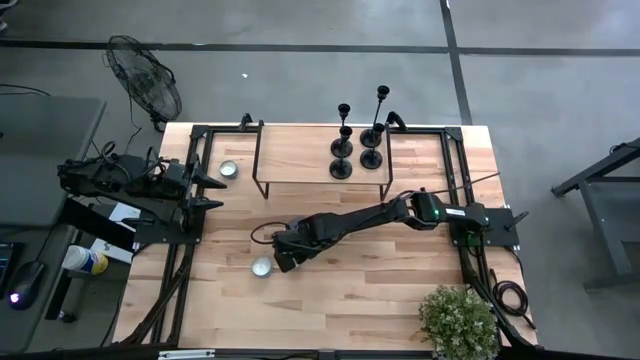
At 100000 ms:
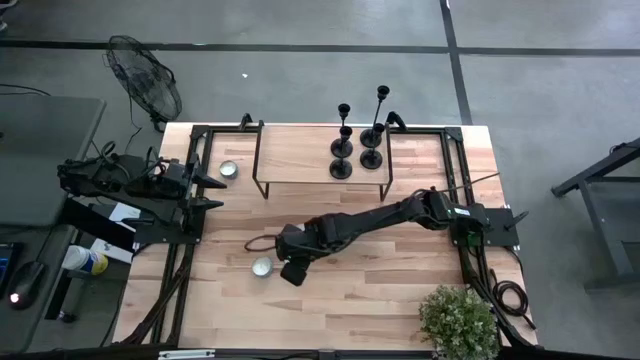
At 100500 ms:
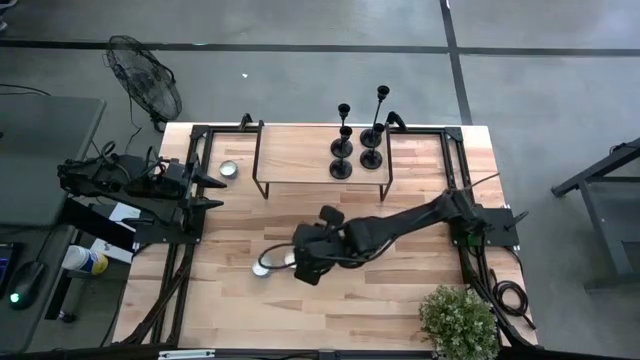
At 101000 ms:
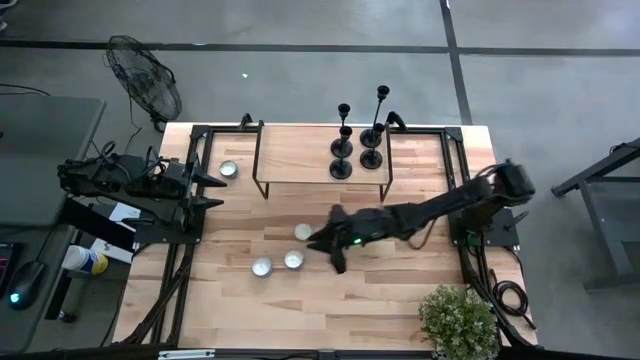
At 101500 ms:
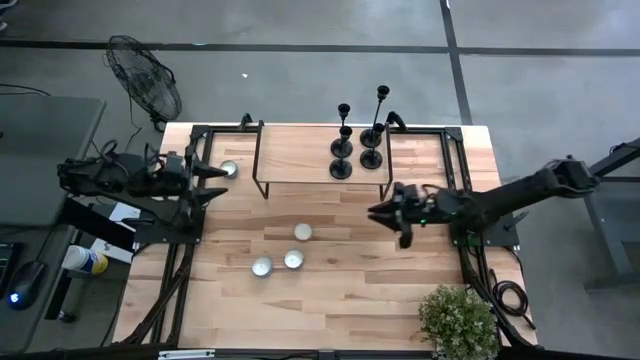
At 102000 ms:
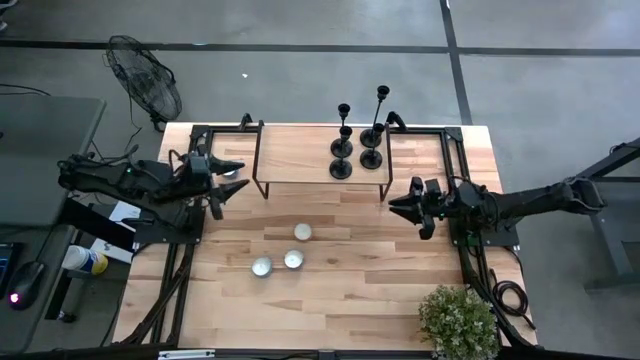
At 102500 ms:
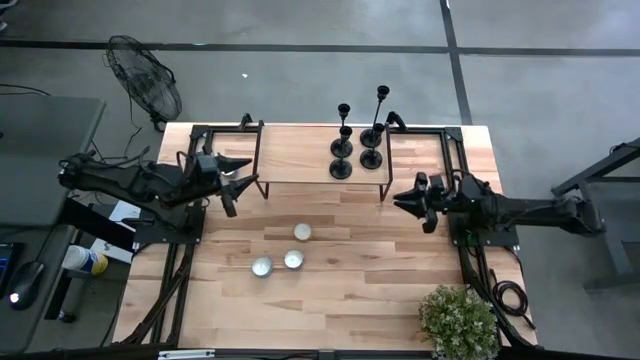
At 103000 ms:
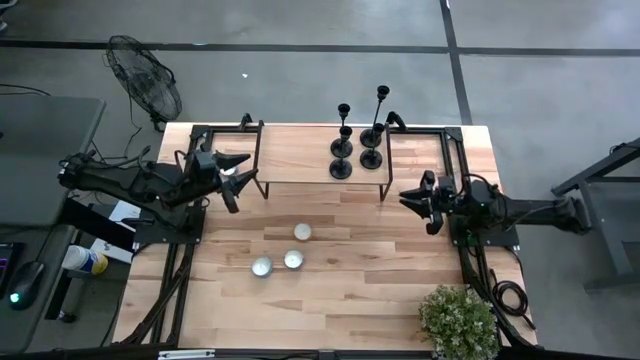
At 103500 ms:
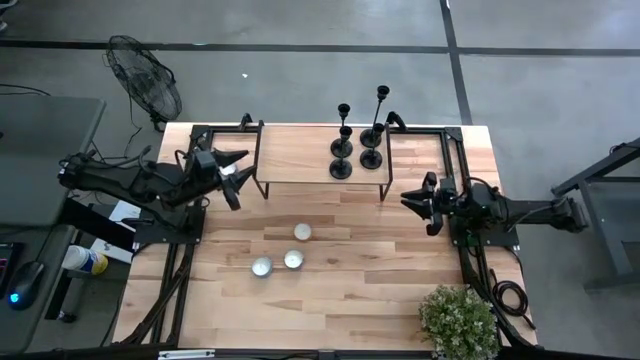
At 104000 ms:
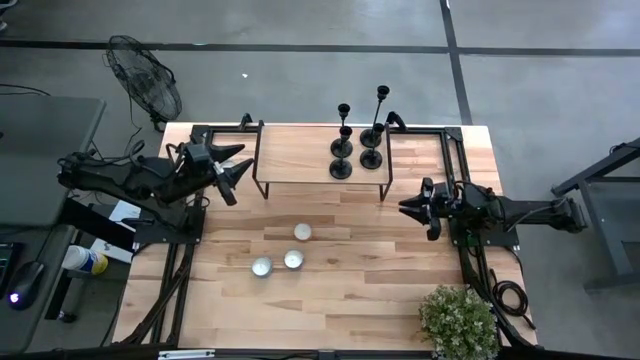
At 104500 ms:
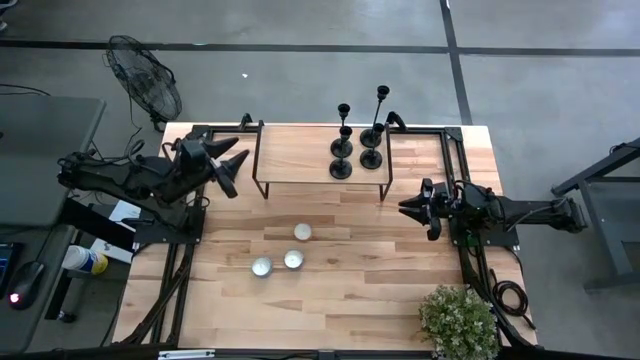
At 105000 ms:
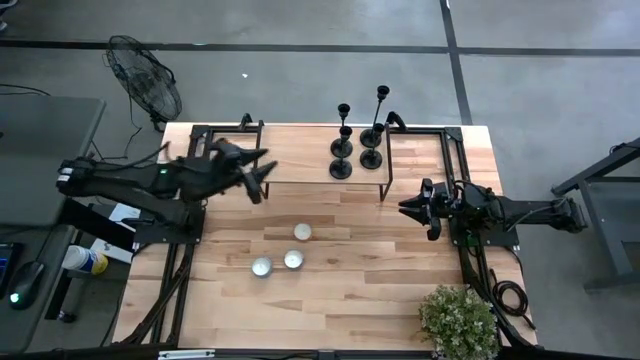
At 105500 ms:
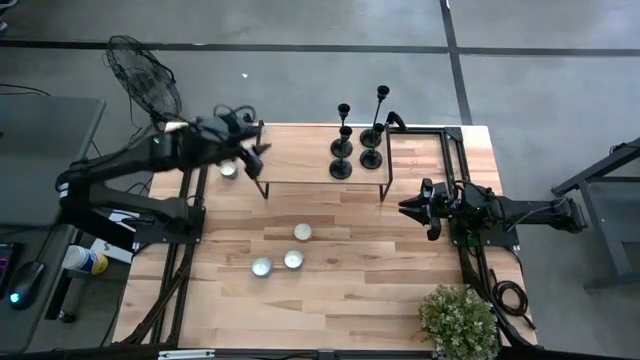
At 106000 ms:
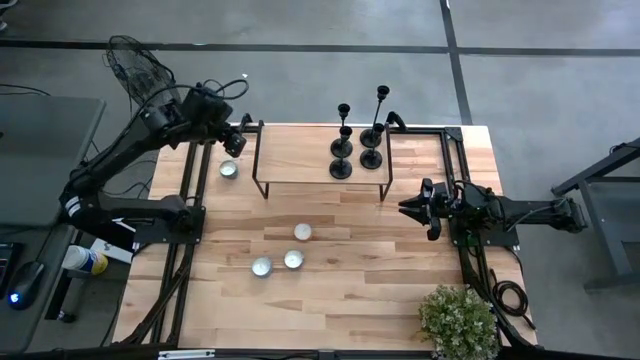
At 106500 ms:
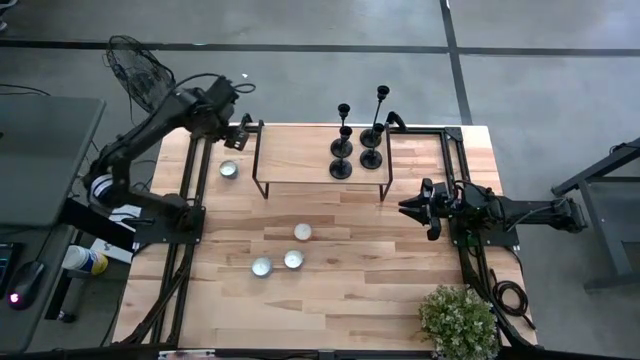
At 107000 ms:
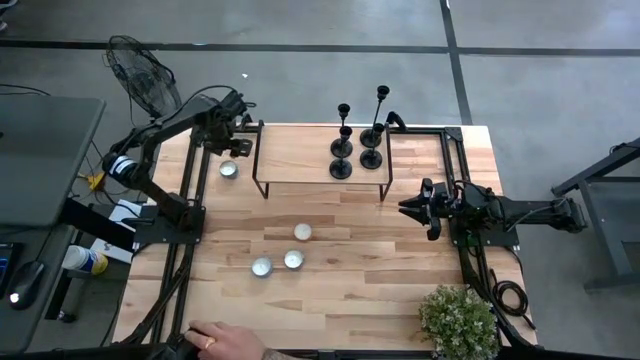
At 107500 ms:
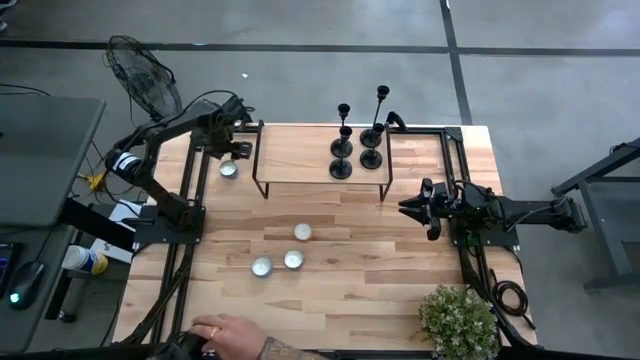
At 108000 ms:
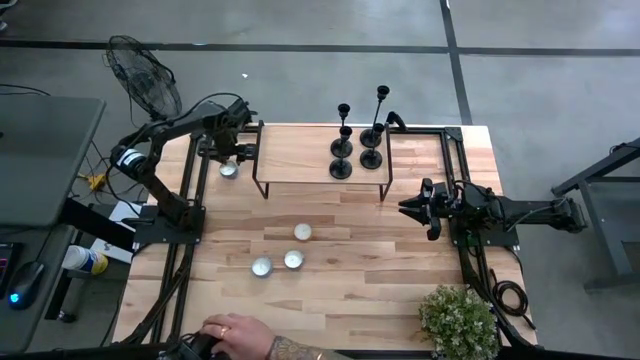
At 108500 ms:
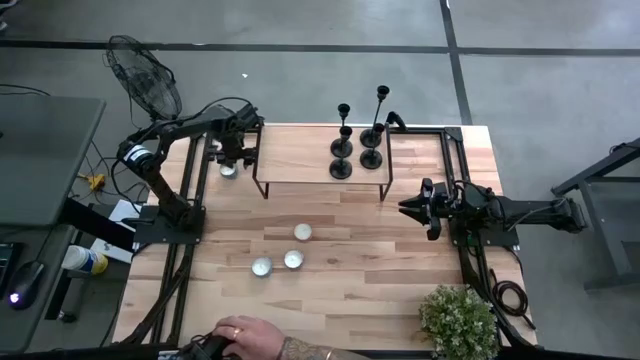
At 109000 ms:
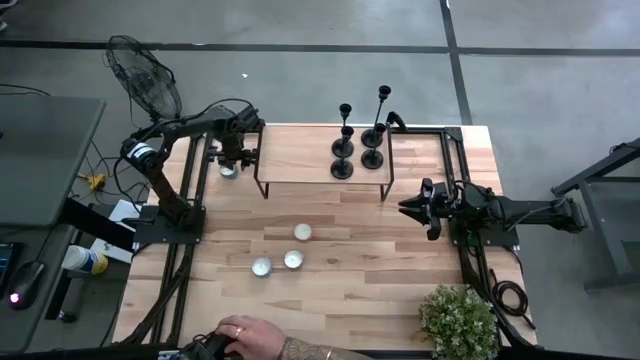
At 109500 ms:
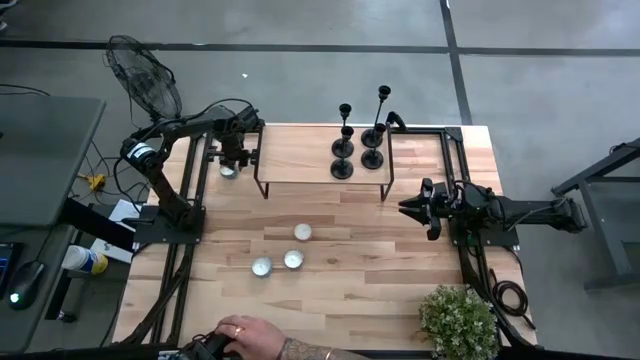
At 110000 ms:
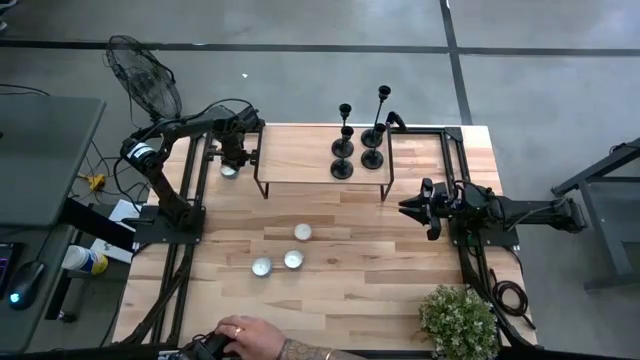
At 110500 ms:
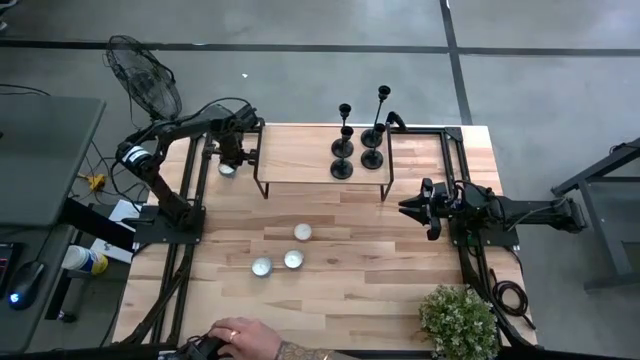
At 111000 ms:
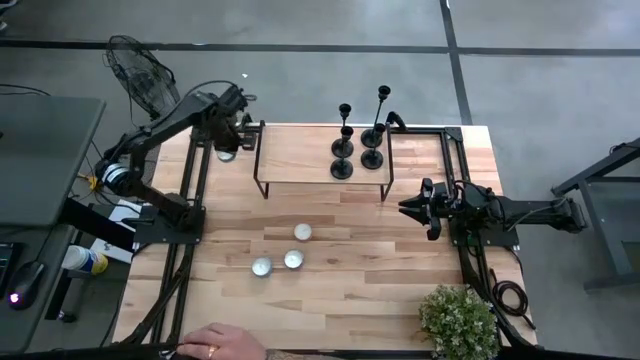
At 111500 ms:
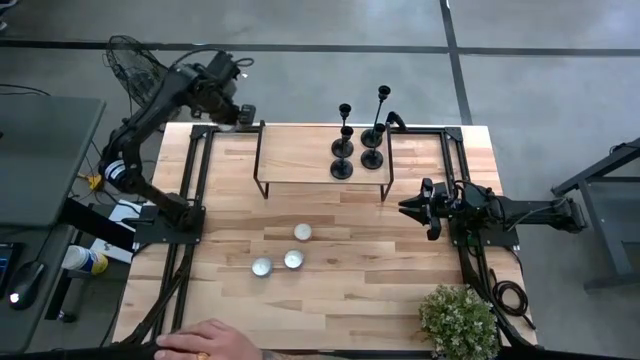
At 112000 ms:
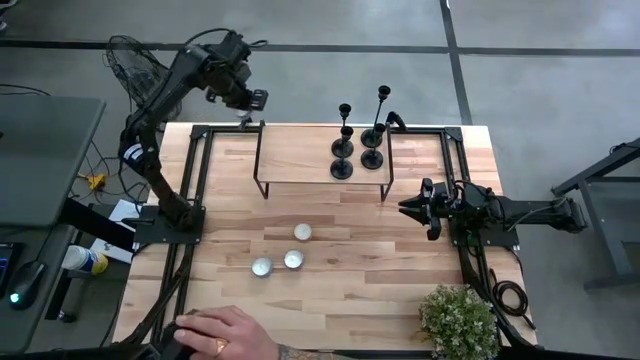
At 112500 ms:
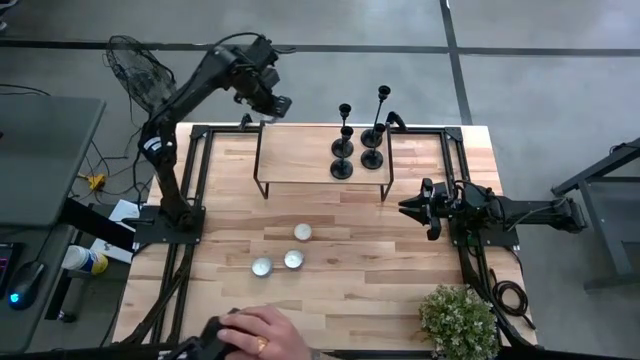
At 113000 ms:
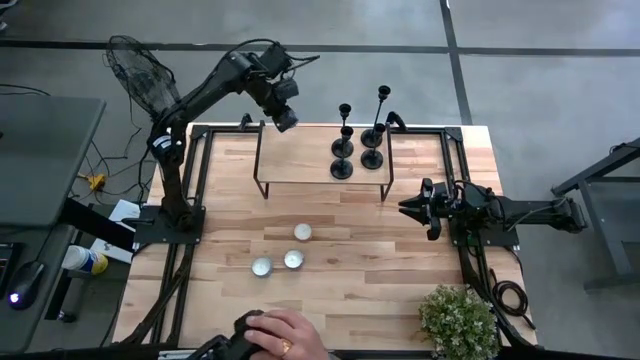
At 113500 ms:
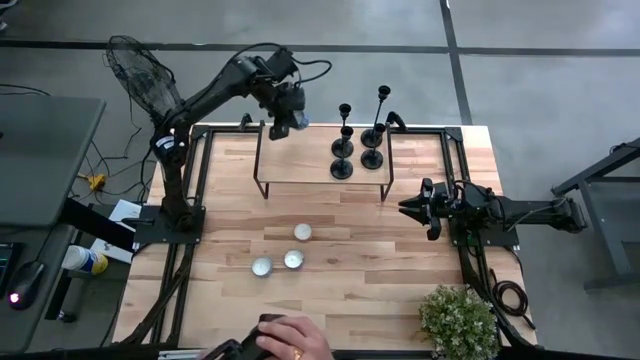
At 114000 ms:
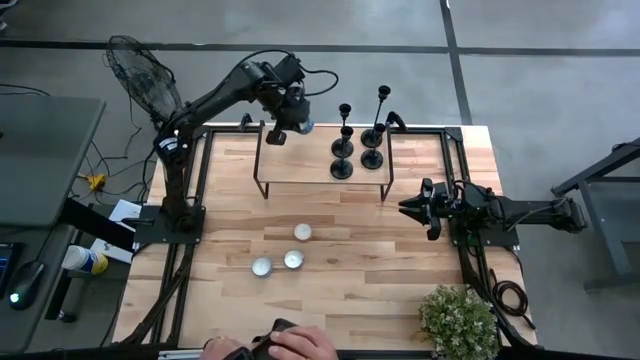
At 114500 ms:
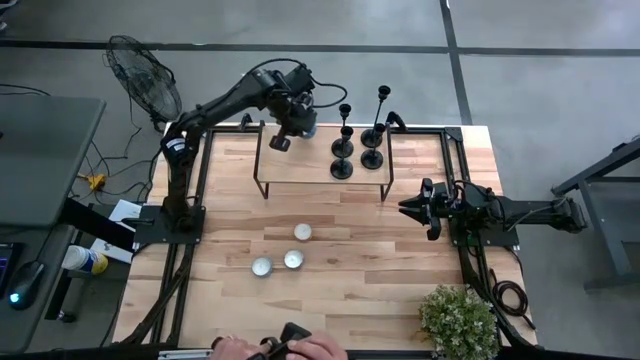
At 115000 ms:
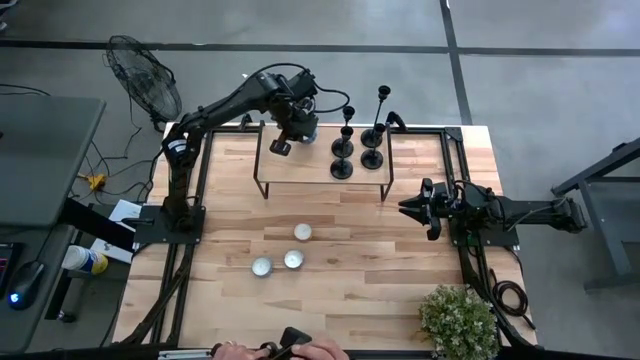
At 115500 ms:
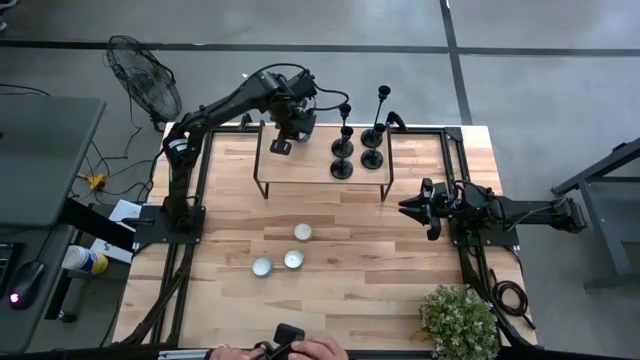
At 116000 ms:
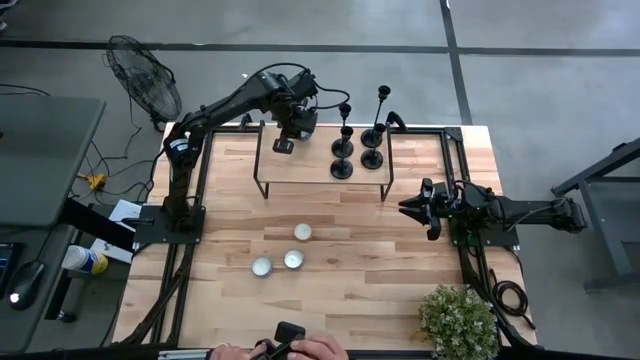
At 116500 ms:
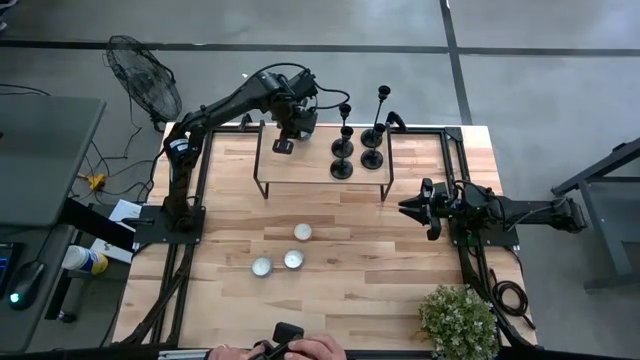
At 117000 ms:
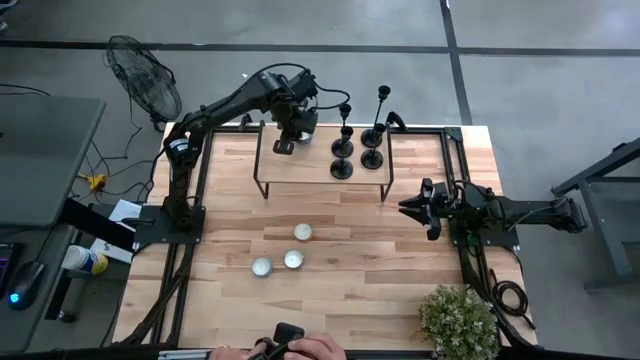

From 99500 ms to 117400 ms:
Task: Pick & Place candle stick holders
Put the blue scented candle on the shelf

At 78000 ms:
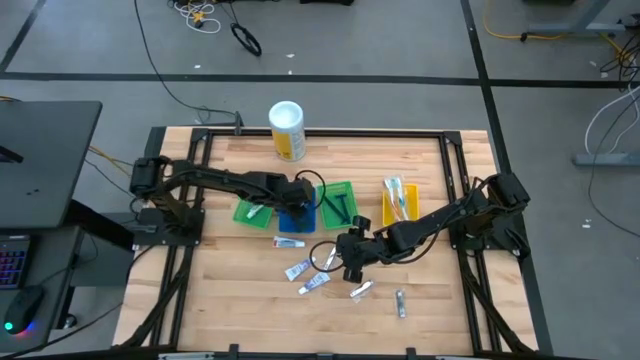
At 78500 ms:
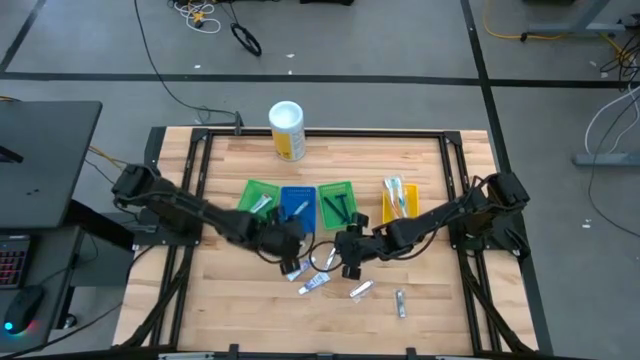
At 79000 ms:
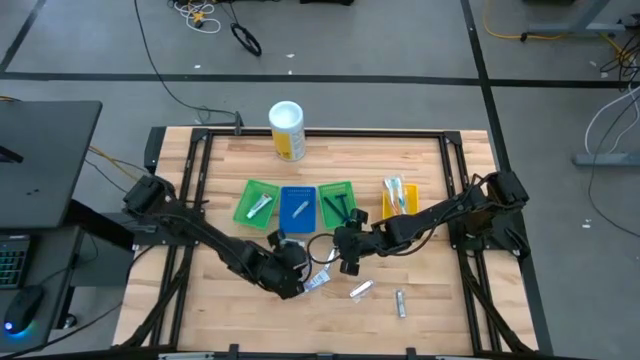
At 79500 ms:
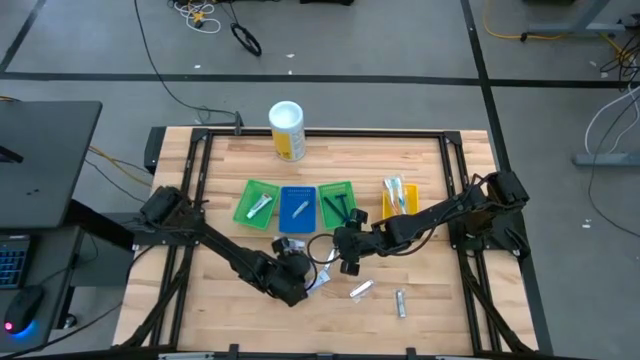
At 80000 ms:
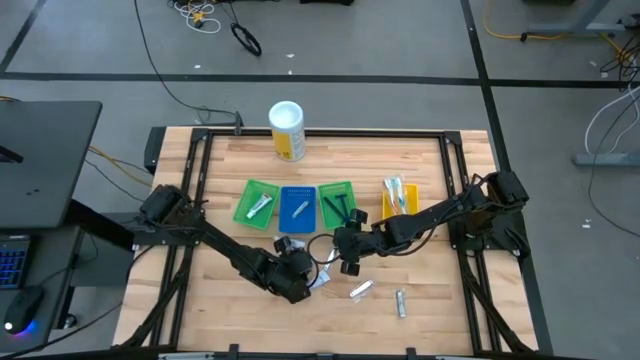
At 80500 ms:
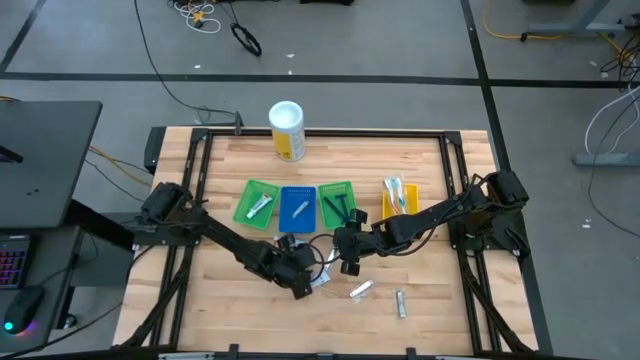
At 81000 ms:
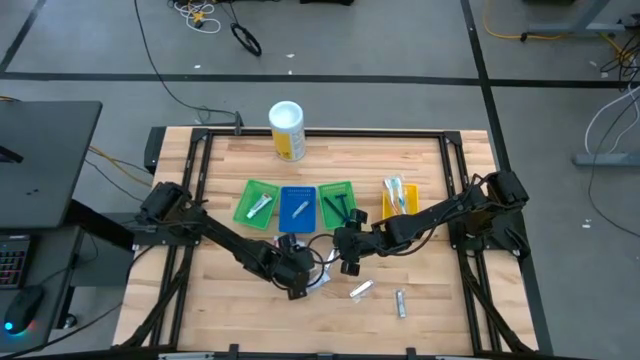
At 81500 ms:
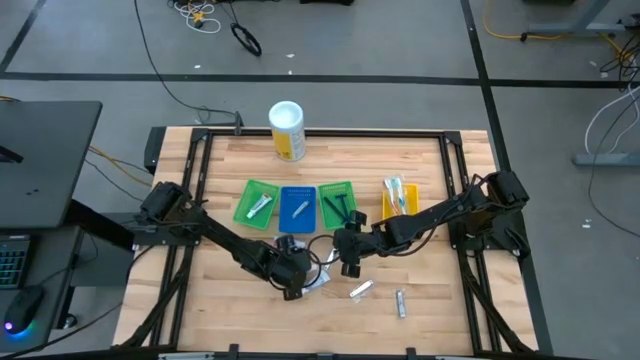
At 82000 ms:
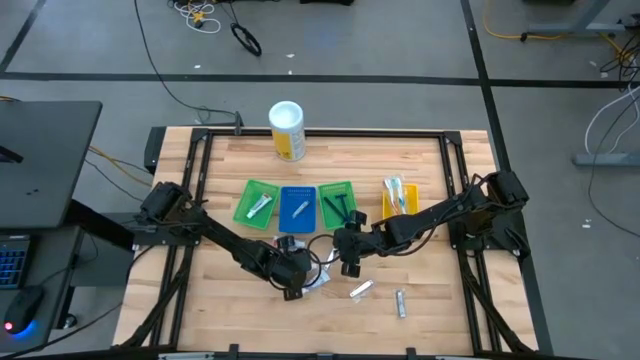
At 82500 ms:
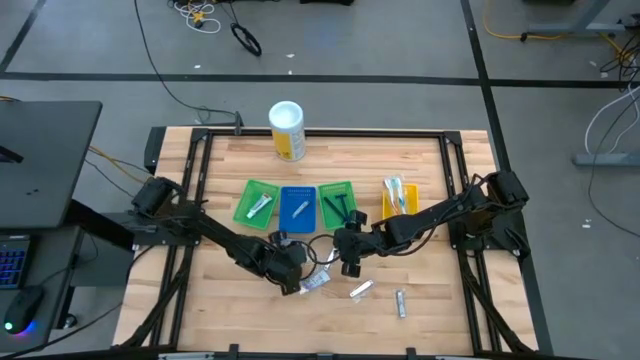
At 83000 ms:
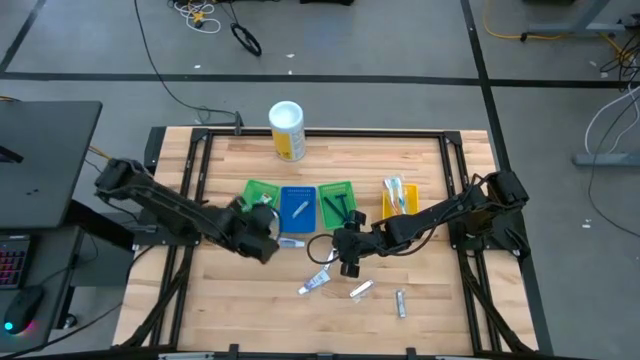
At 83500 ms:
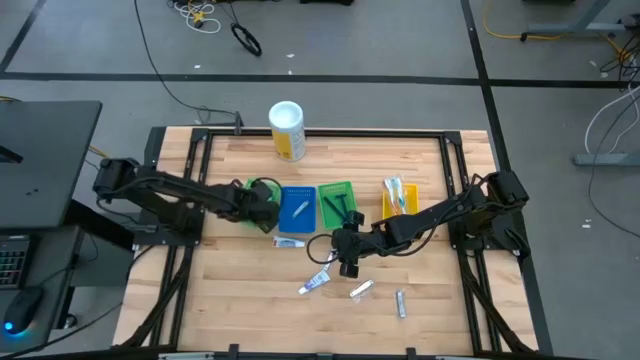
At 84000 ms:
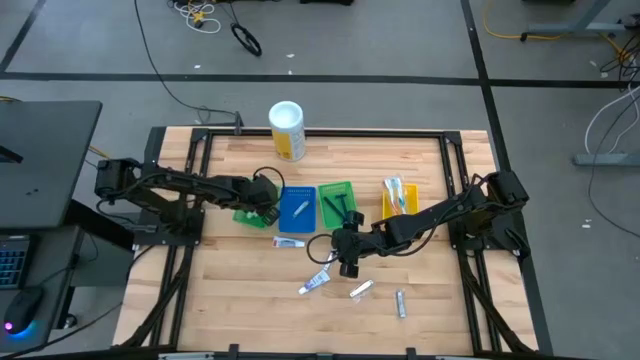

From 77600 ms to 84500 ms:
Task: Pick & Place Travel size toiletries
Put the purple and white toothpaste into the left green bin
